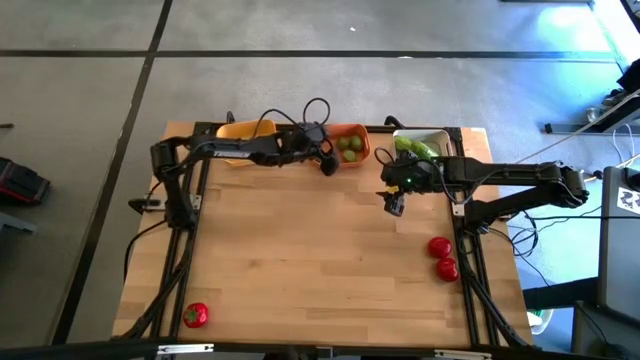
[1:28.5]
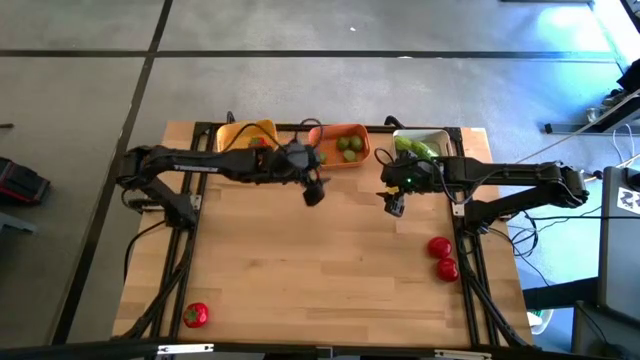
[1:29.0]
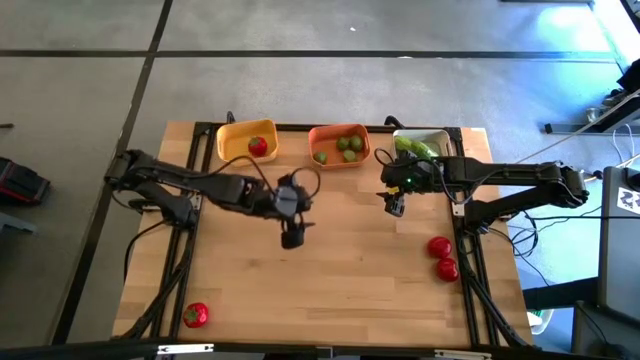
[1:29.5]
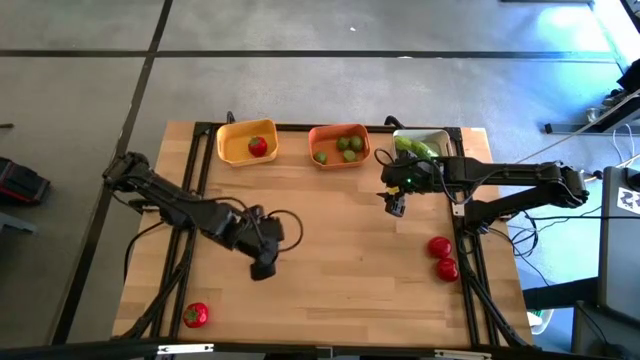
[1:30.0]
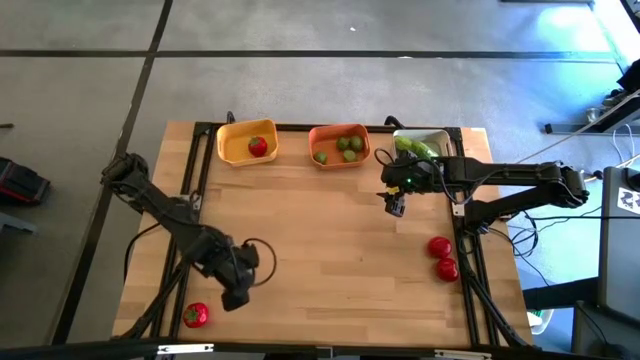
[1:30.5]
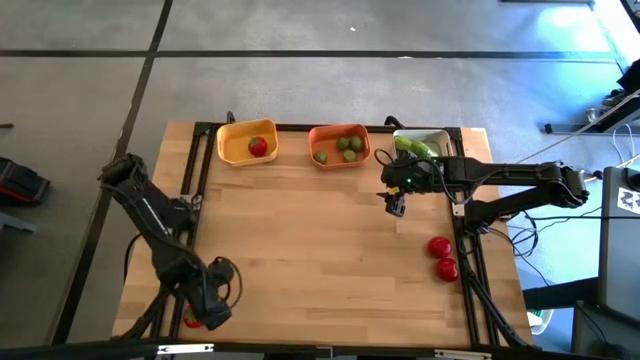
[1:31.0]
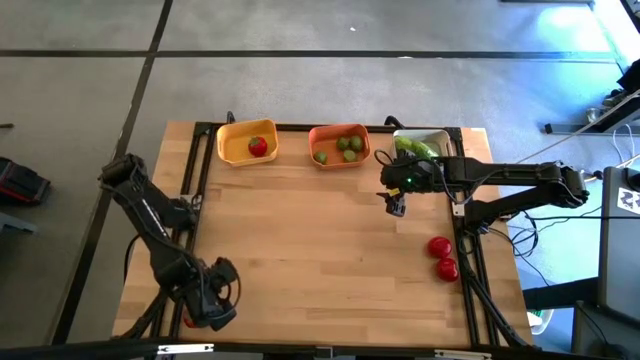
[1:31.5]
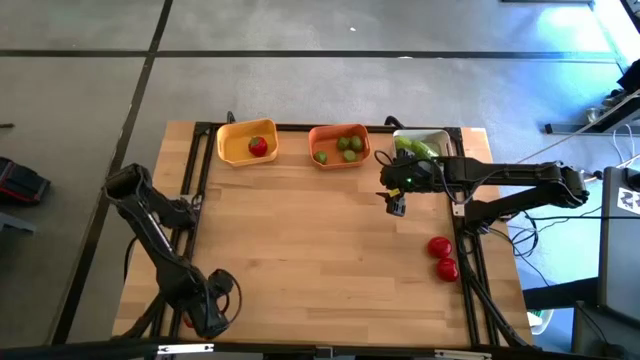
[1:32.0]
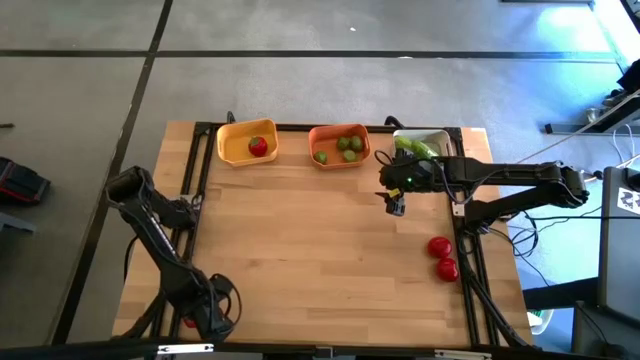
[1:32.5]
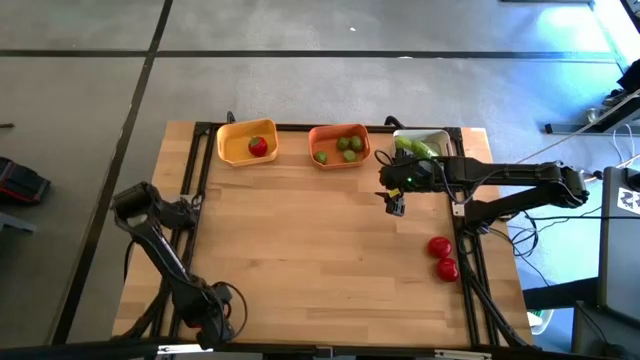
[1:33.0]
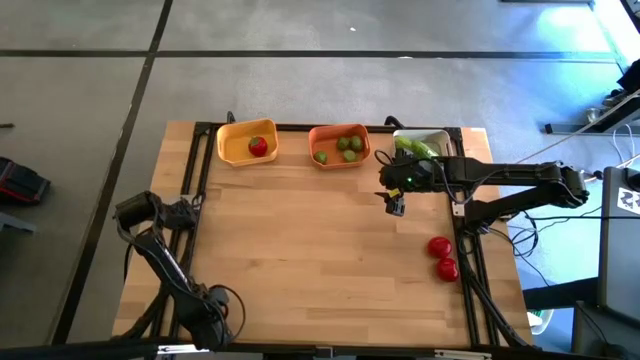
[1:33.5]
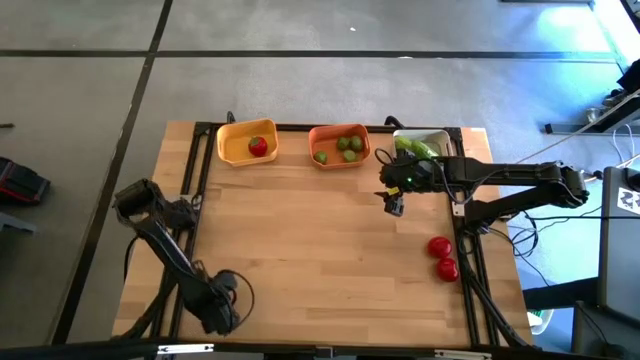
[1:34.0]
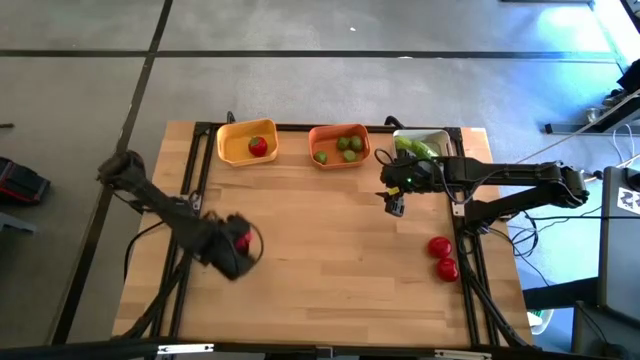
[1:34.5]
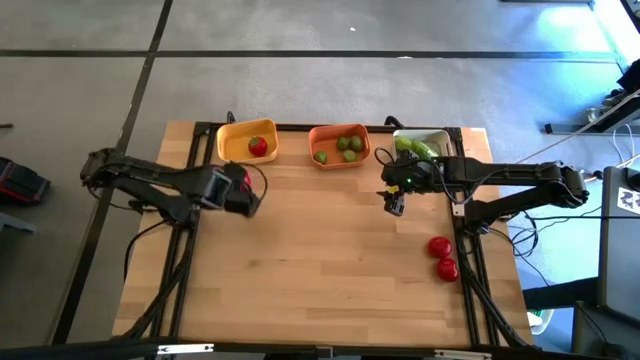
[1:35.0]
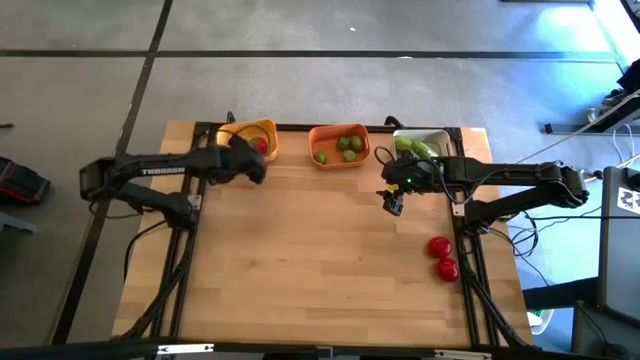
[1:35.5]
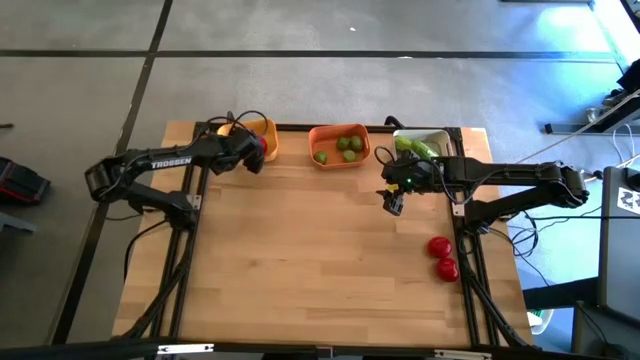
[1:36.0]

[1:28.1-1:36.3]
Task: Sort produce into baskets
Put the bottom left tomato into the yellow bin

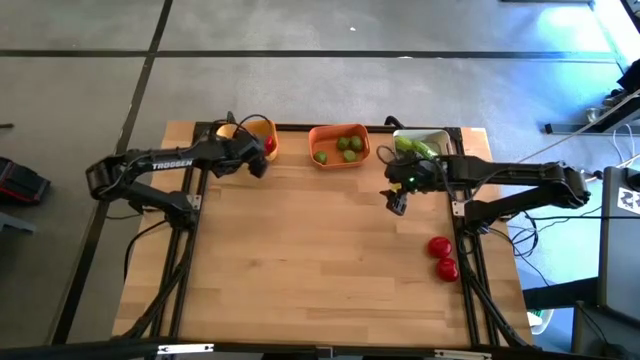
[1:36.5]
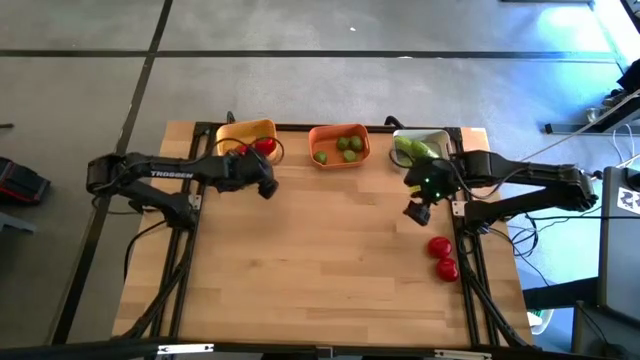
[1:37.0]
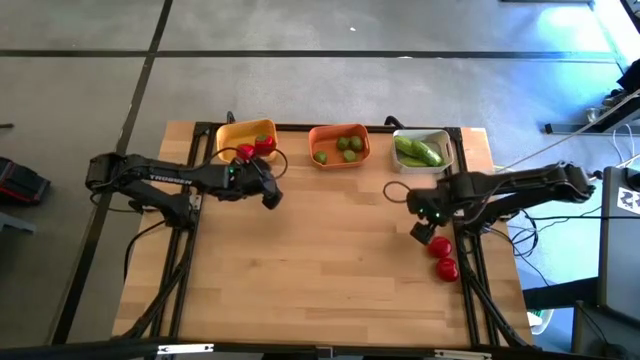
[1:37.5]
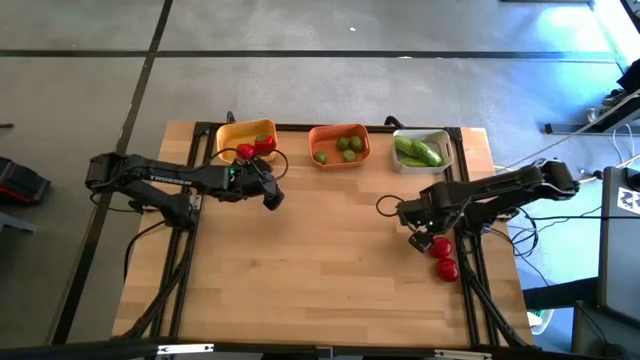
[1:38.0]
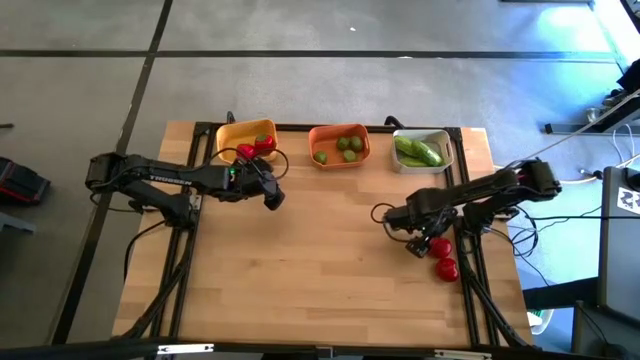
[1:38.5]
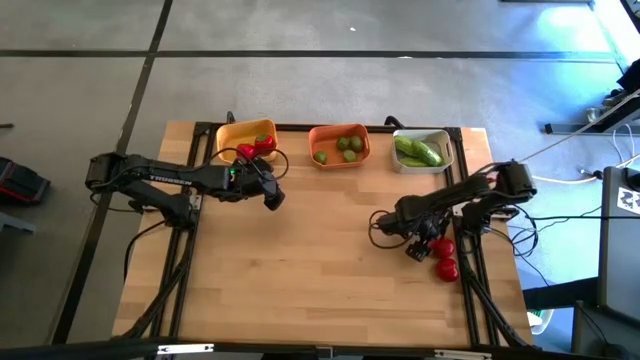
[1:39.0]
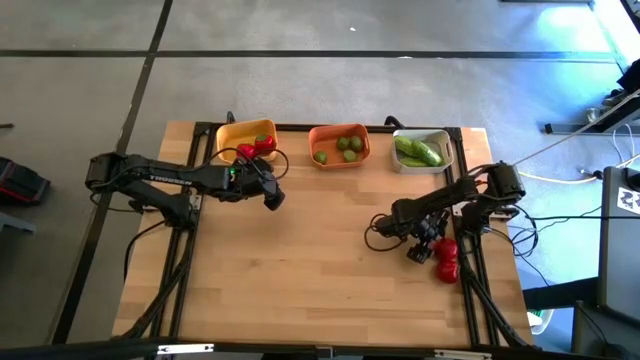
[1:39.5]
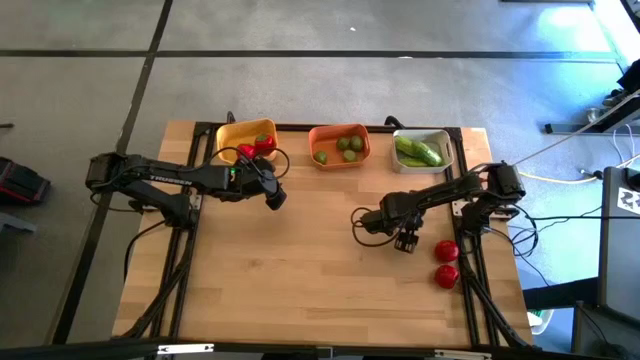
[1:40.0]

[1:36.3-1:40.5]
Put the top tomato into the yellow bin

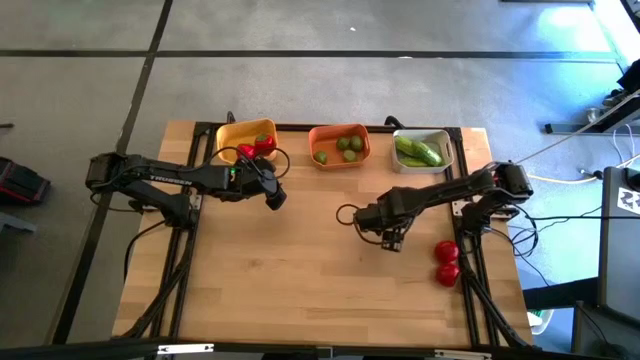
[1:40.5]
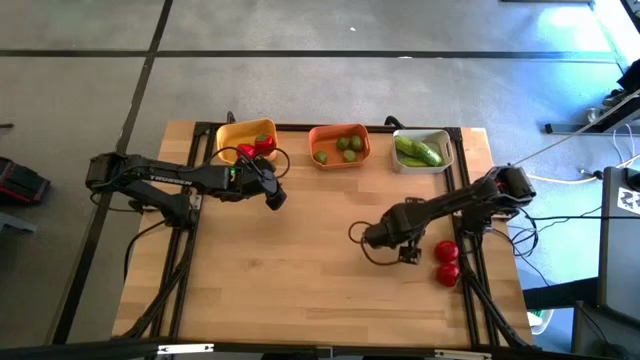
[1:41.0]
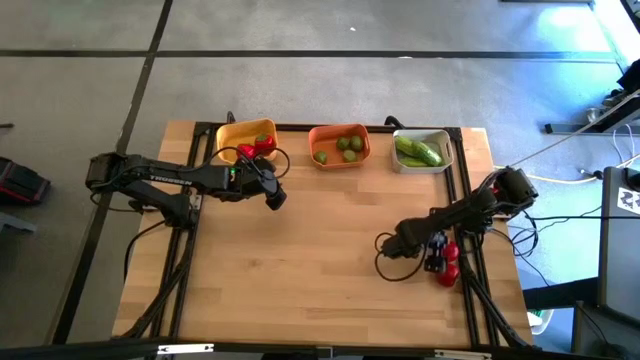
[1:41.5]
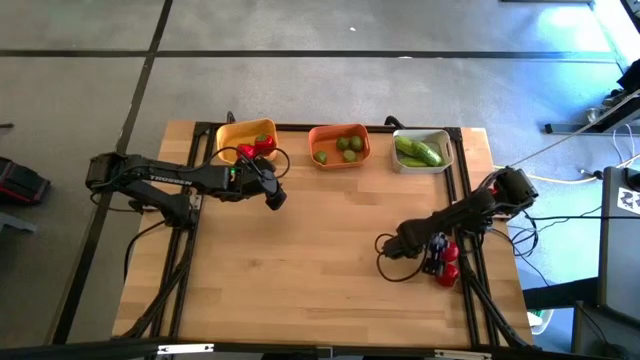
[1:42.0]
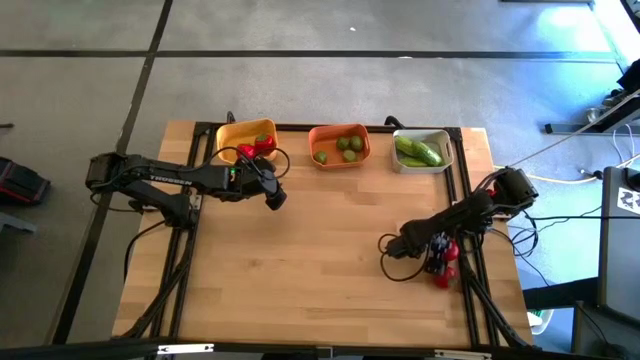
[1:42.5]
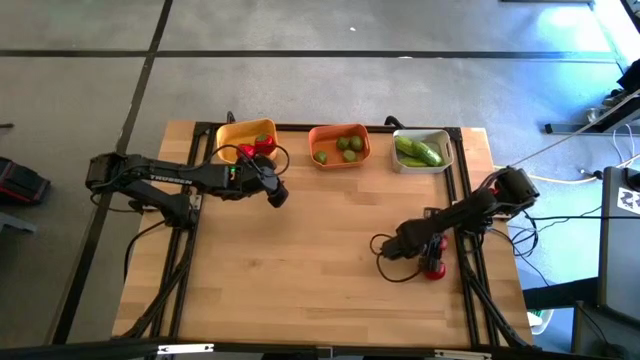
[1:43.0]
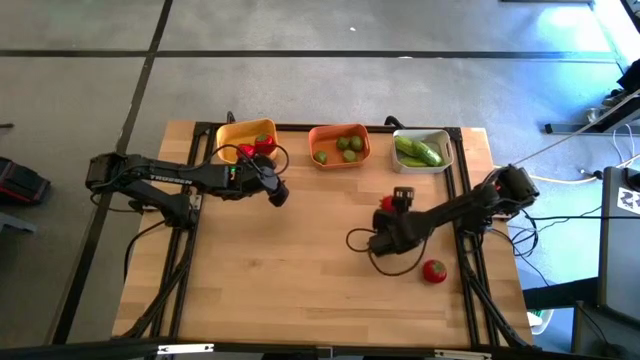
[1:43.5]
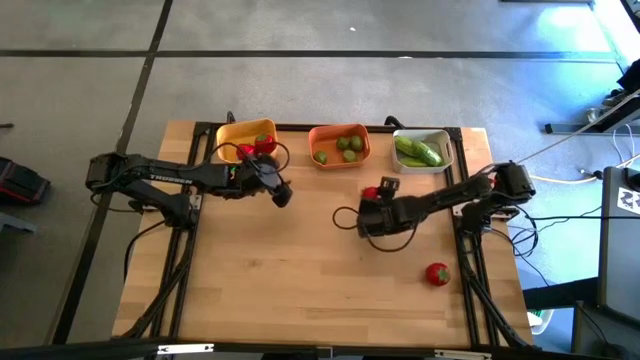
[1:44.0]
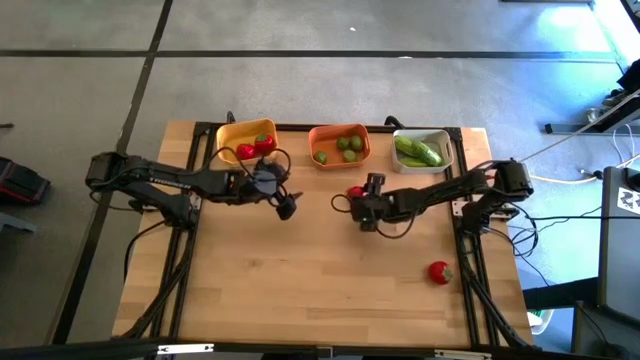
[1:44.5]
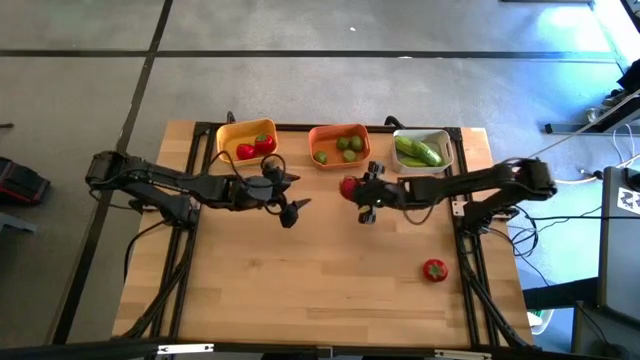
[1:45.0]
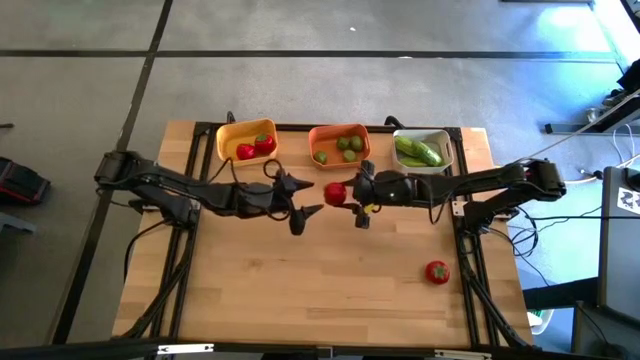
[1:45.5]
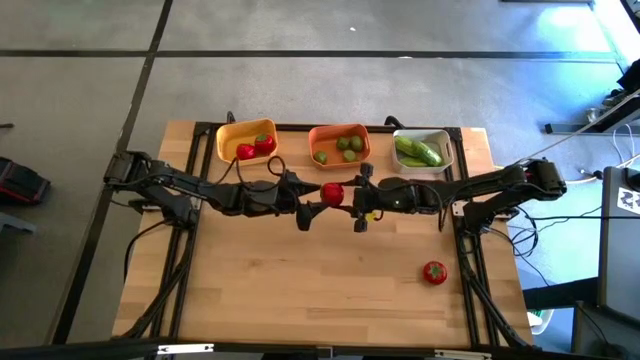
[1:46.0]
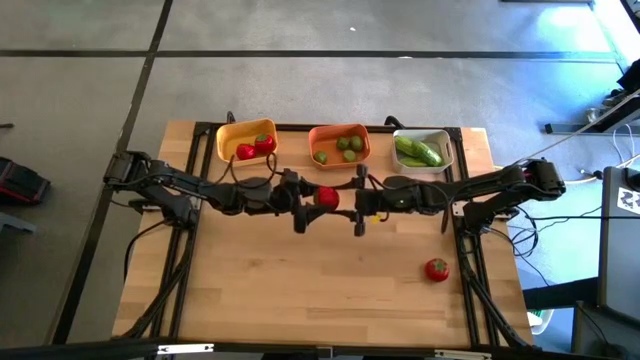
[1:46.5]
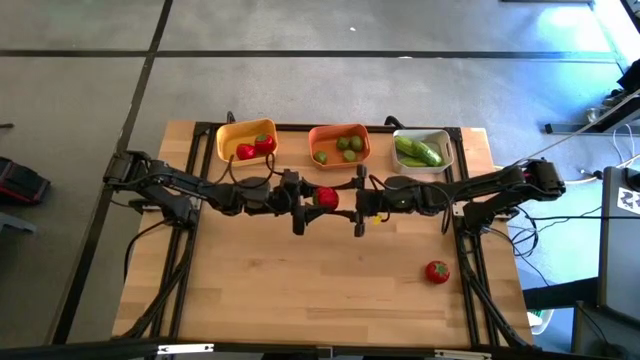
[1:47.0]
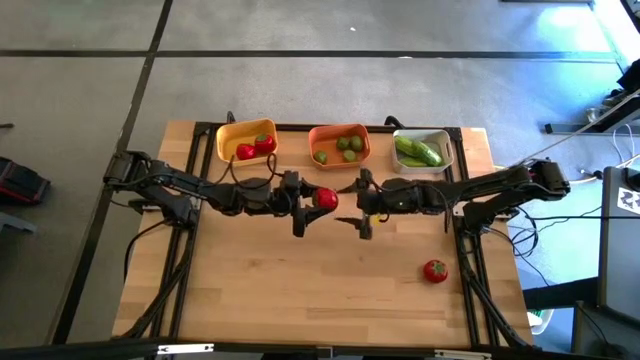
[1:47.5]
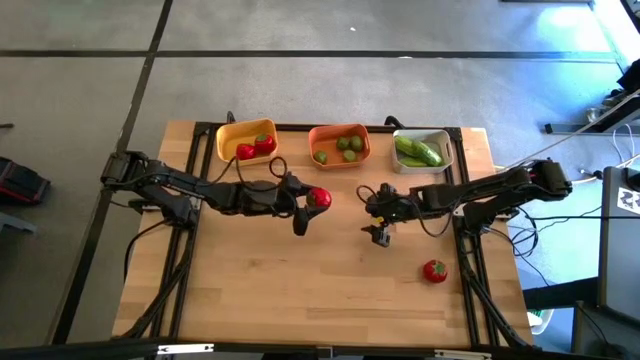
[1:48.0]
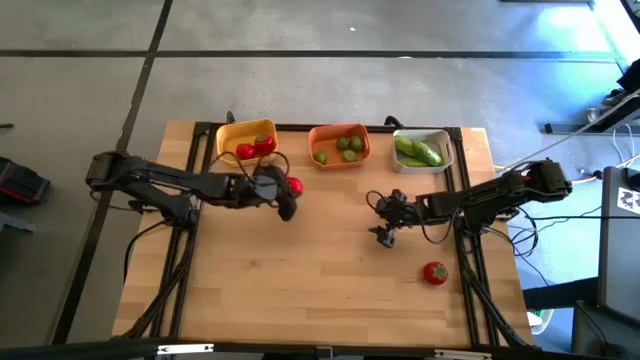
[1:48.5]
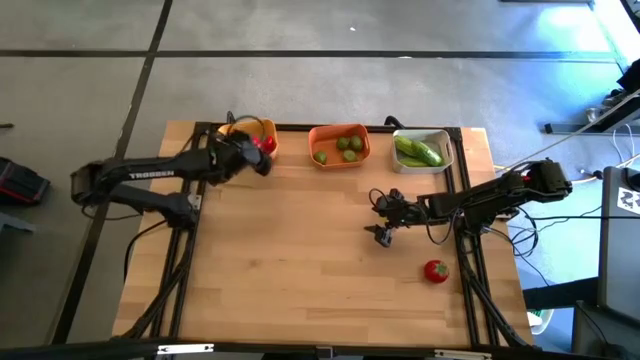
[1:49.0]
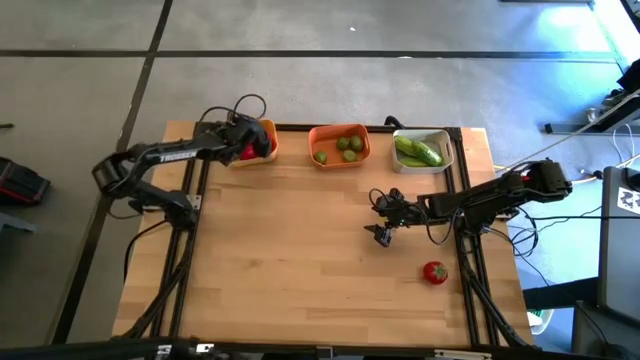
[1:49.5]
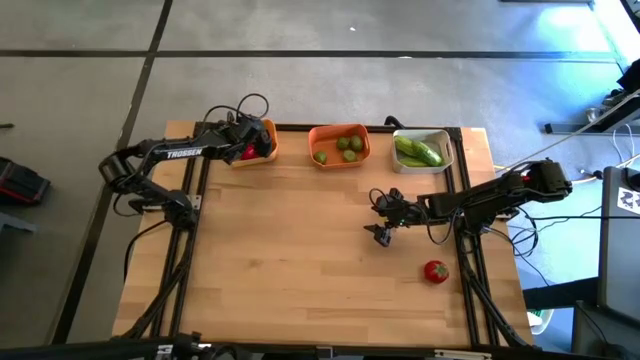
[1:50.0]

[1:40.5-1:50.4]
Put the top tomato into the yellow bin
